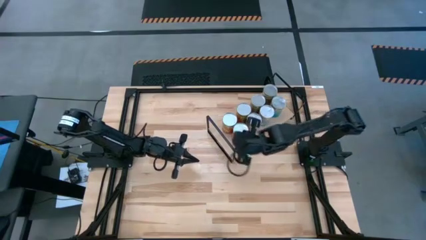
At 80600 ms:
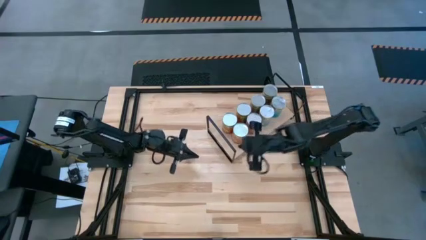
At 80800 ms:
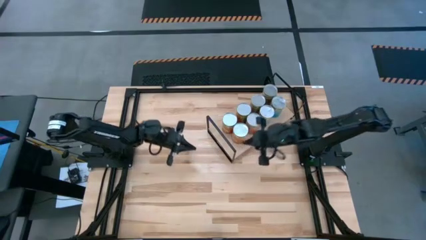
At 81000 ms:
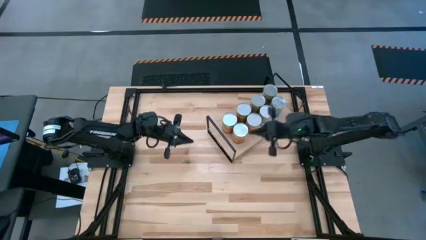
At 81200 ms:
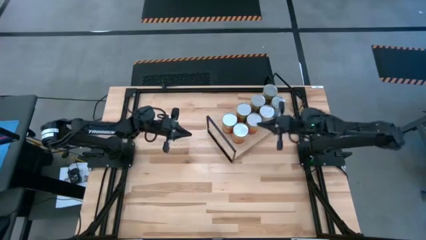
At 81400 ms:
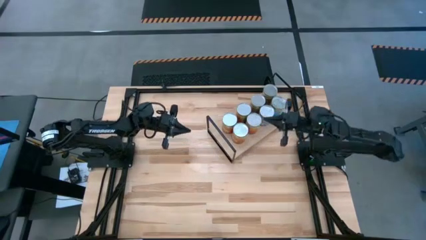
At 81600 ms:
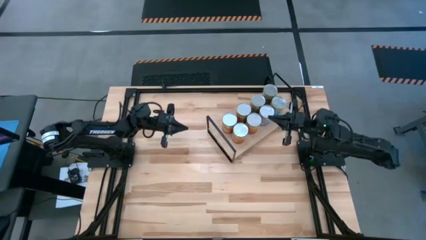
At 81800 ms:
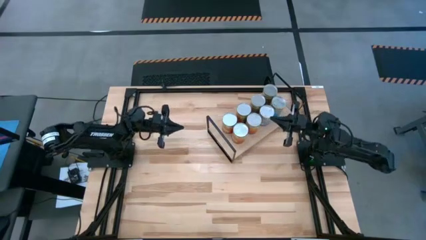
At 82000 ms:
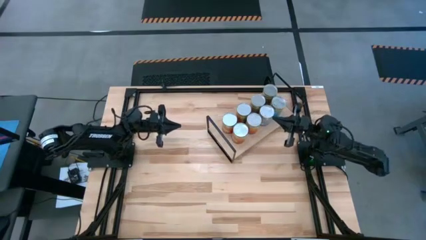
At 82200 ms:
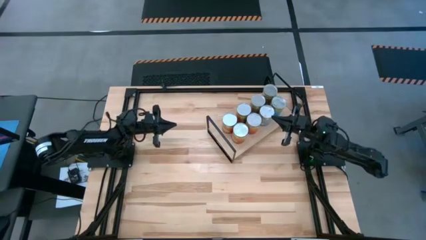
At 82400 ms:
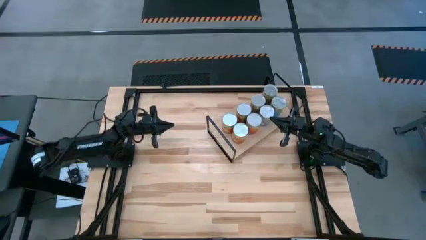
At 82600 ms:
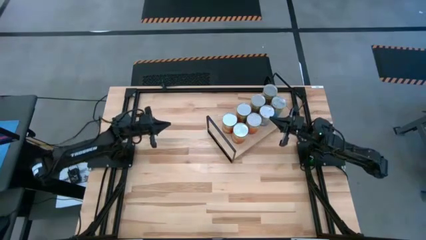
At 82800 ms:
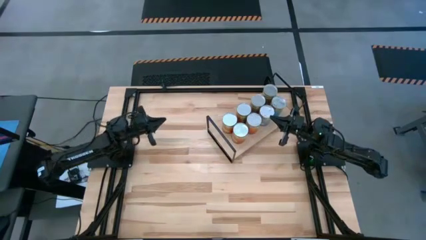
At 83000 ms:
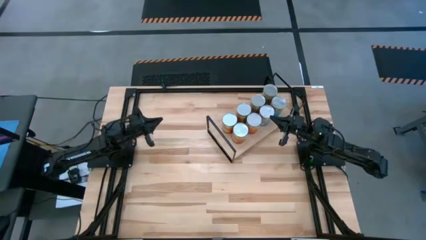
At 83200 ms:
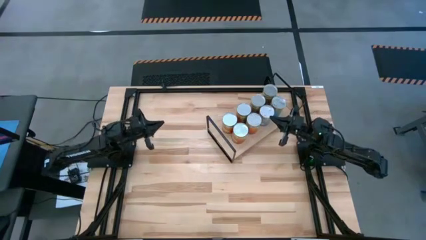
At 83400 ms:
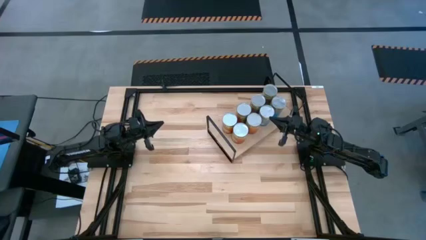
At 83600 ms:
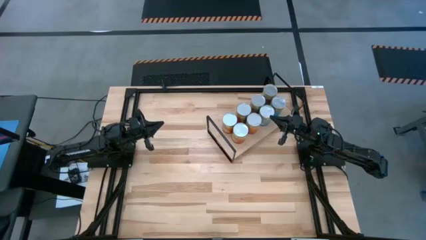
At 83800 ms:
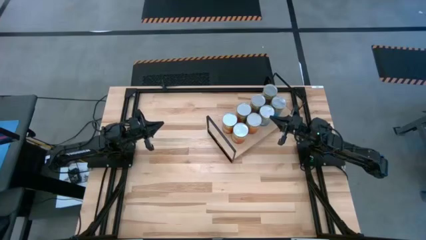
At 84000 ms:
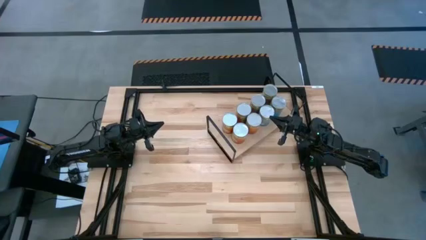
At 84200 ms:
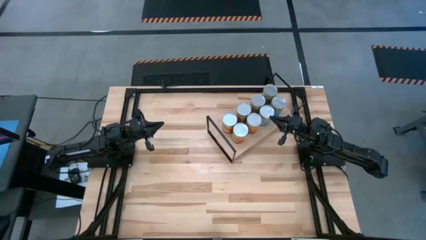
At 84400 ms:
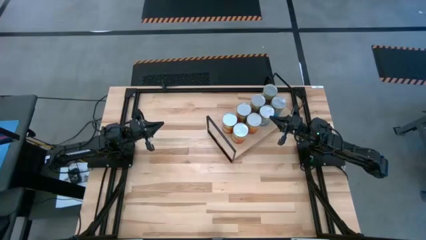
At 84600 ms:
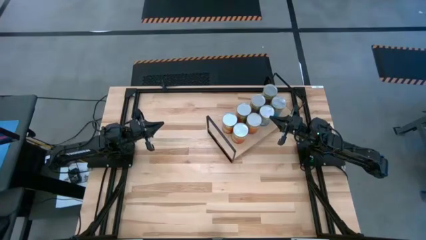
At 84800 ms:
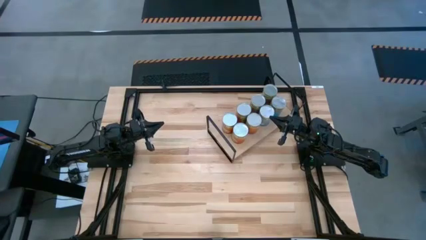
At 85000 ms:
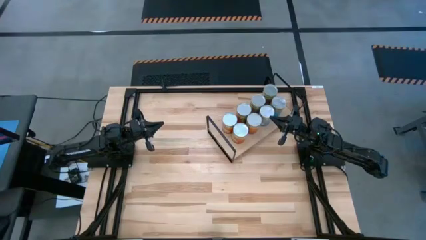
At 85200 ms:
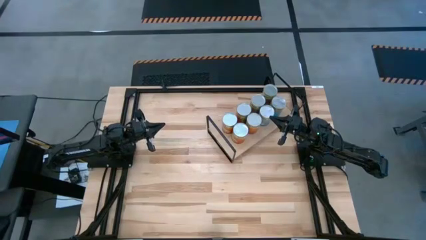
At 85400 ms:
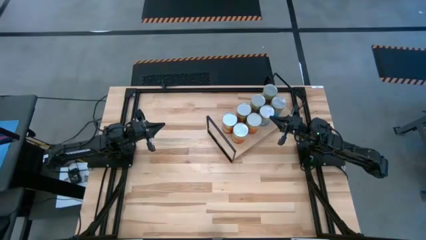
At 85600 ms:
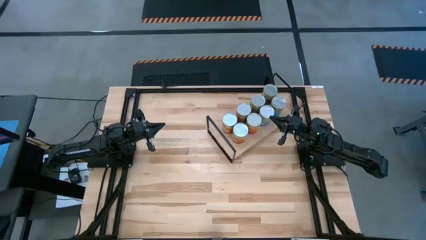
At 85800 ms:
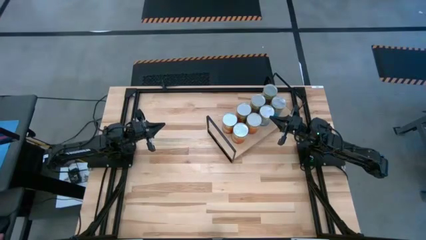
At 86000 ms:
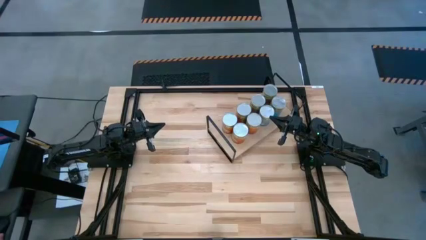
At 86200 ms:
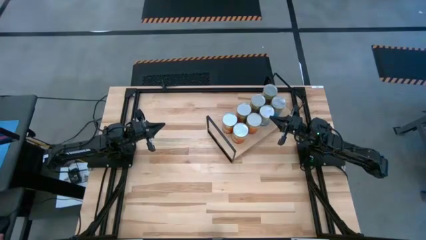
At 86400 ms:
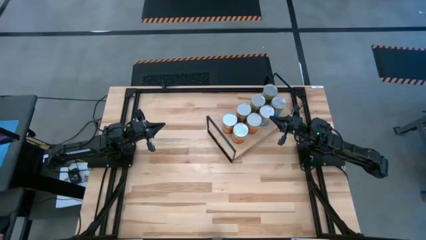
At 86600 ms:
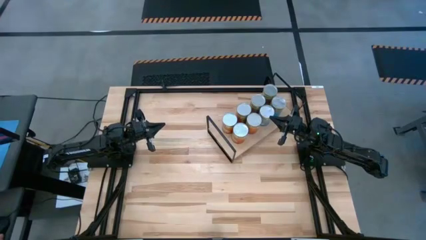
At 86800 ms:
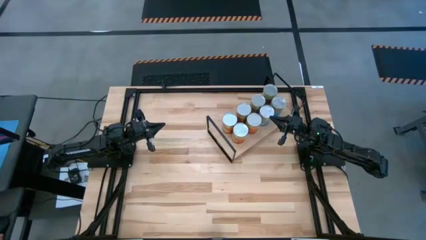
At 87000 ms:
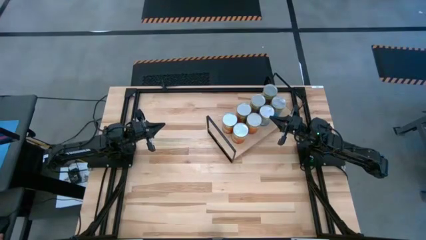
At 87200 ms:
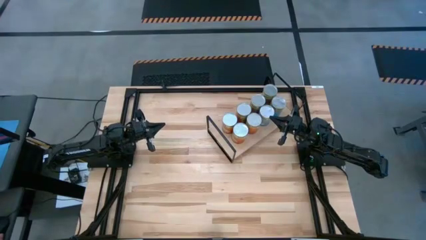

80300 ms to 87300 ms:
Task: Pick and place cans onto a shelf
Return to Home Position

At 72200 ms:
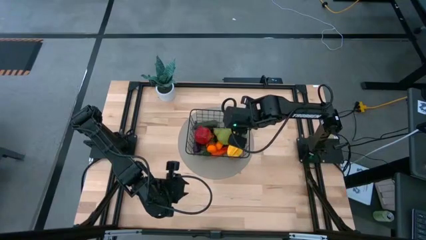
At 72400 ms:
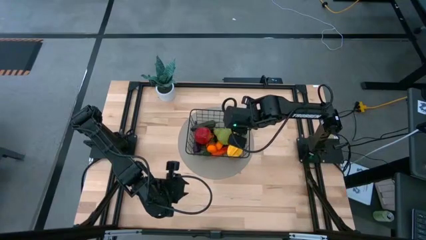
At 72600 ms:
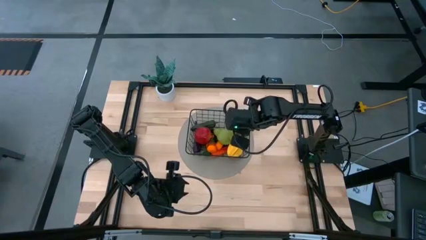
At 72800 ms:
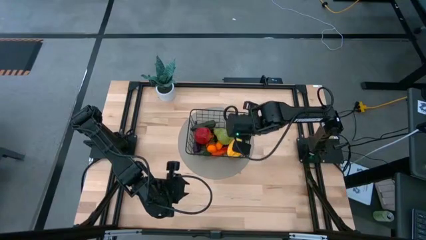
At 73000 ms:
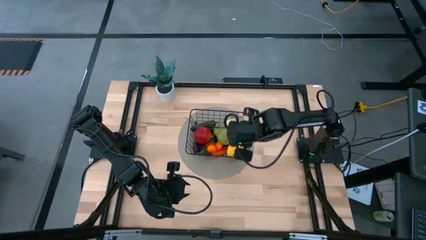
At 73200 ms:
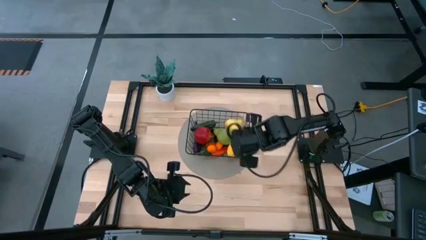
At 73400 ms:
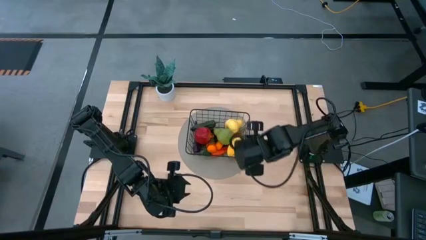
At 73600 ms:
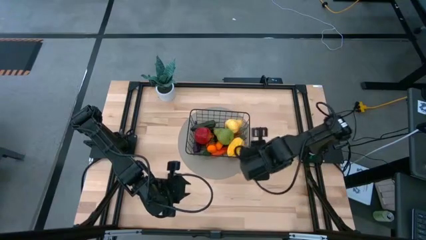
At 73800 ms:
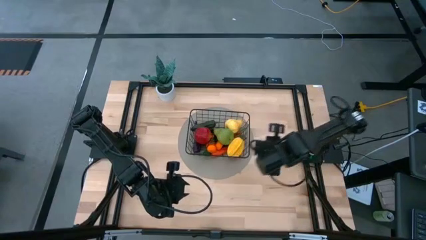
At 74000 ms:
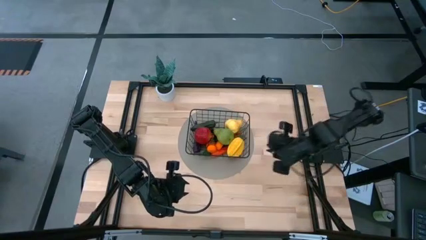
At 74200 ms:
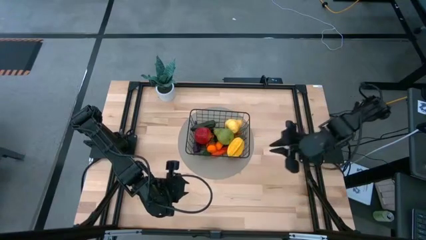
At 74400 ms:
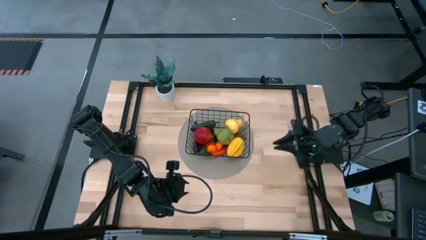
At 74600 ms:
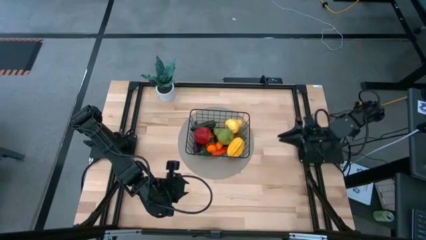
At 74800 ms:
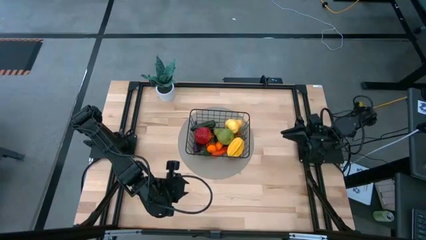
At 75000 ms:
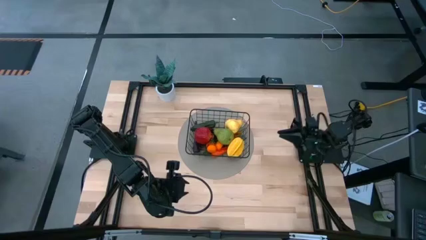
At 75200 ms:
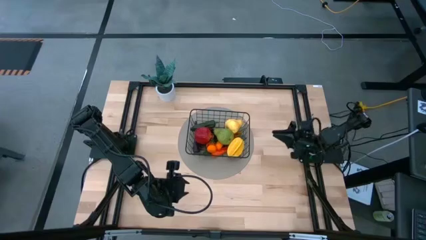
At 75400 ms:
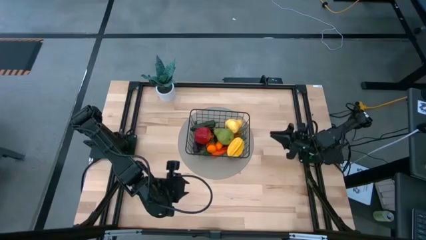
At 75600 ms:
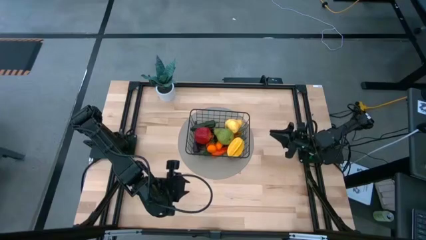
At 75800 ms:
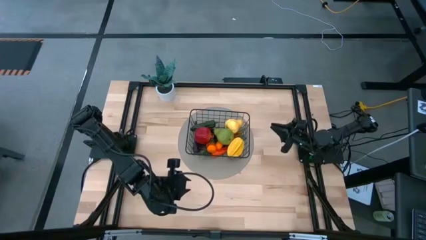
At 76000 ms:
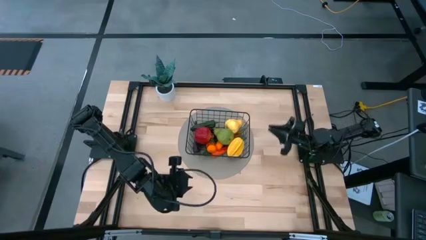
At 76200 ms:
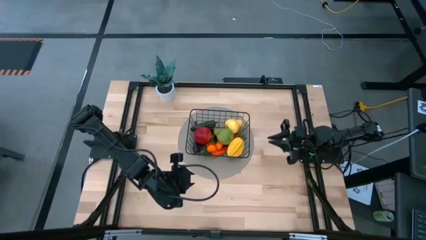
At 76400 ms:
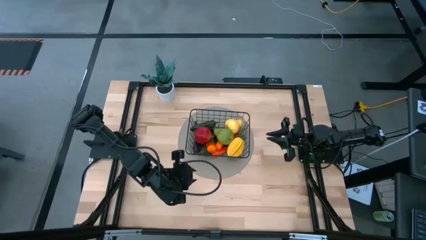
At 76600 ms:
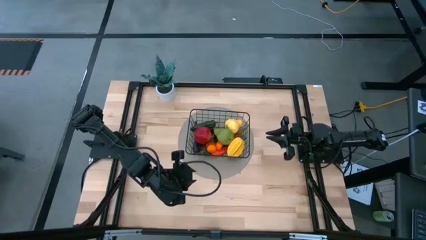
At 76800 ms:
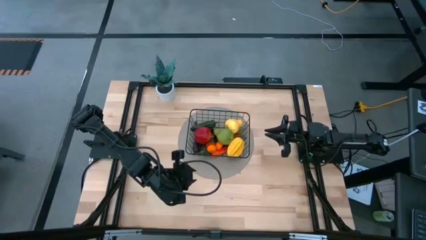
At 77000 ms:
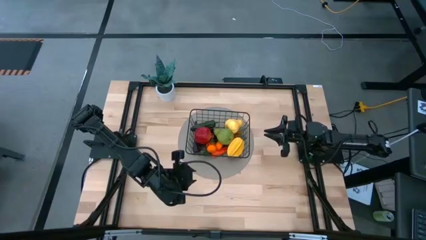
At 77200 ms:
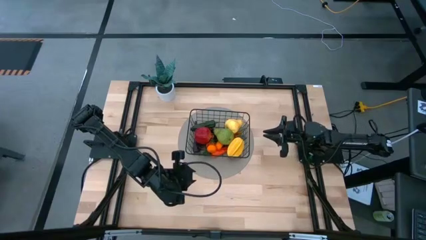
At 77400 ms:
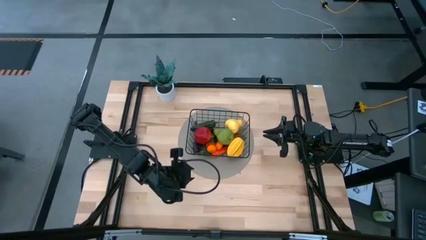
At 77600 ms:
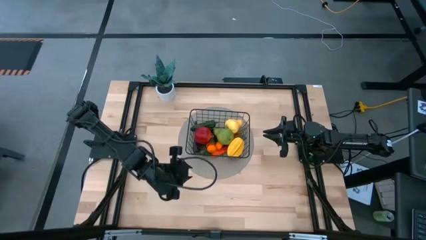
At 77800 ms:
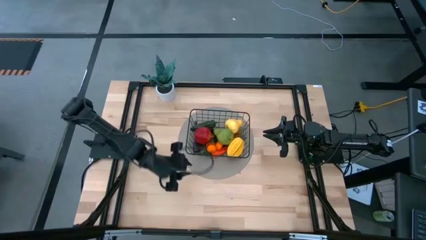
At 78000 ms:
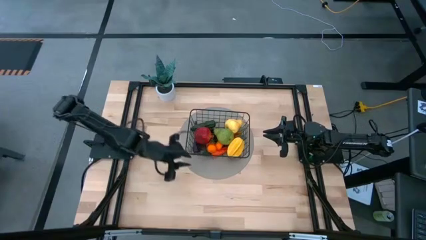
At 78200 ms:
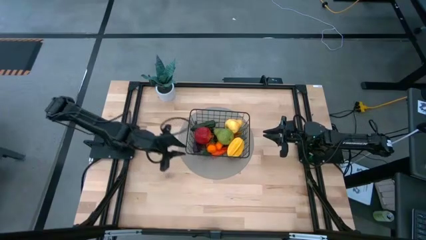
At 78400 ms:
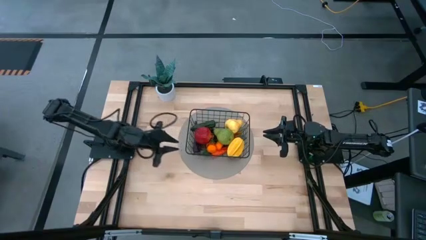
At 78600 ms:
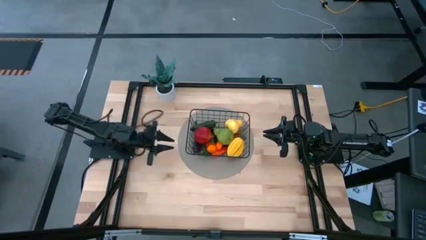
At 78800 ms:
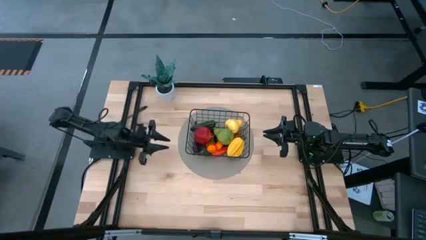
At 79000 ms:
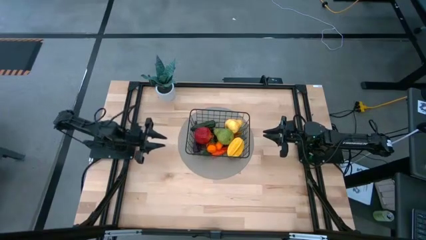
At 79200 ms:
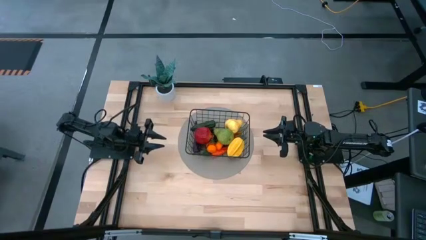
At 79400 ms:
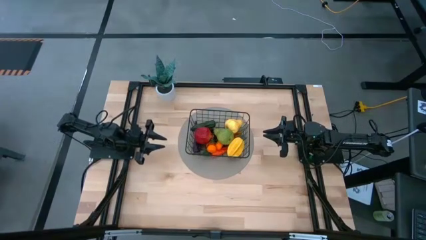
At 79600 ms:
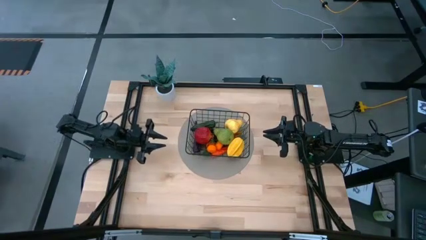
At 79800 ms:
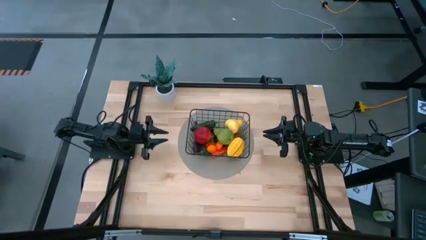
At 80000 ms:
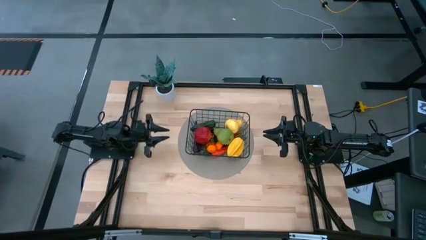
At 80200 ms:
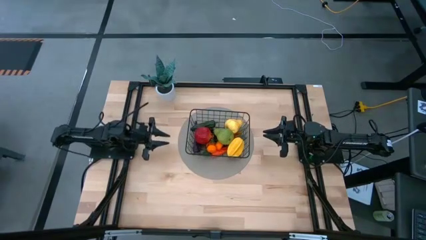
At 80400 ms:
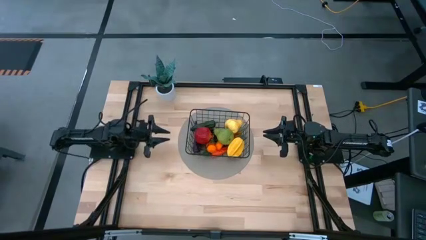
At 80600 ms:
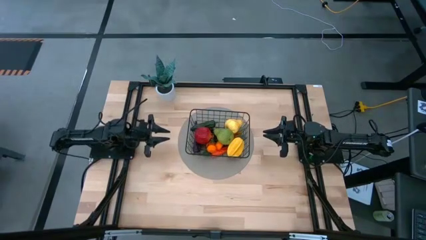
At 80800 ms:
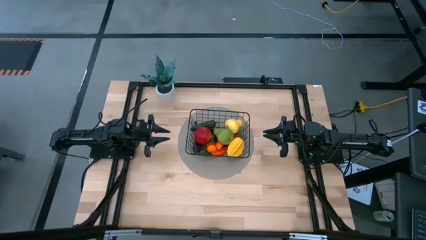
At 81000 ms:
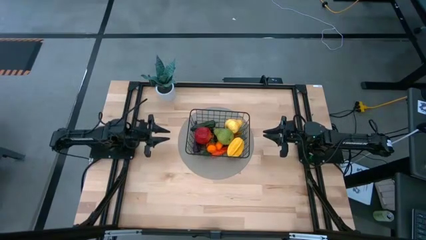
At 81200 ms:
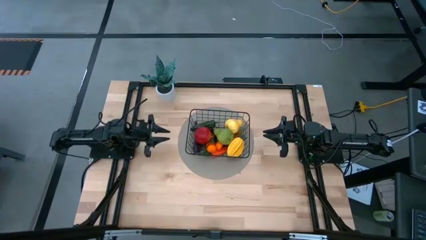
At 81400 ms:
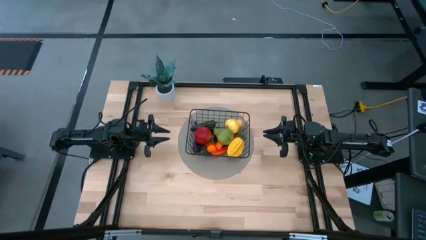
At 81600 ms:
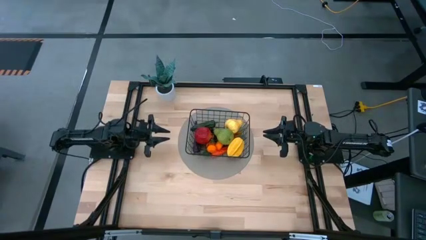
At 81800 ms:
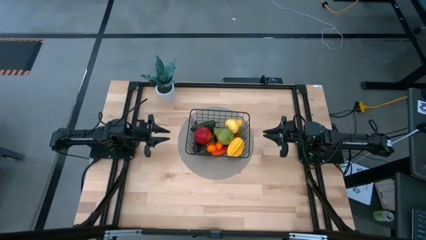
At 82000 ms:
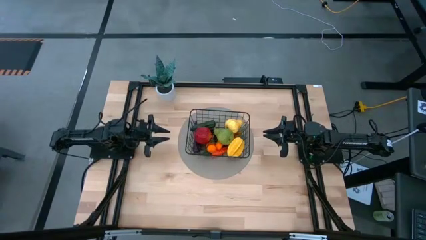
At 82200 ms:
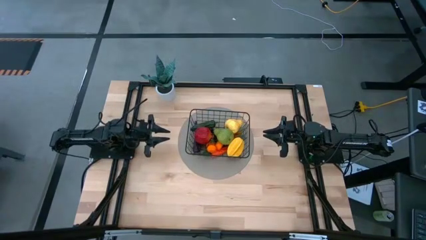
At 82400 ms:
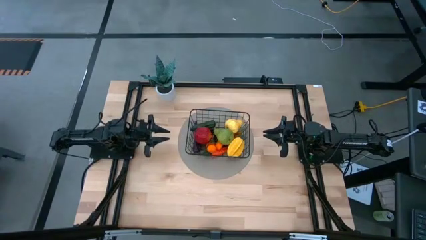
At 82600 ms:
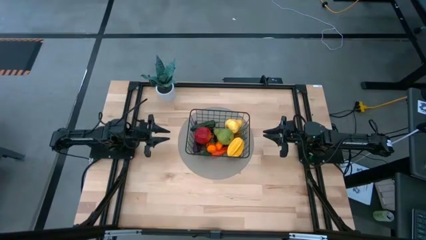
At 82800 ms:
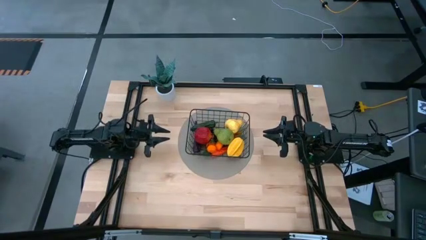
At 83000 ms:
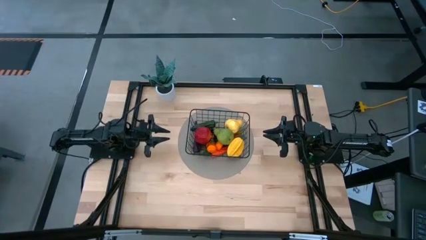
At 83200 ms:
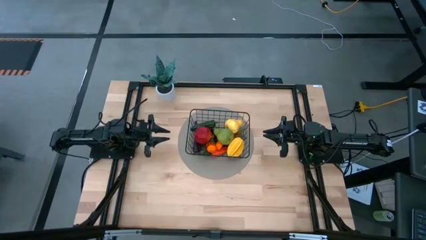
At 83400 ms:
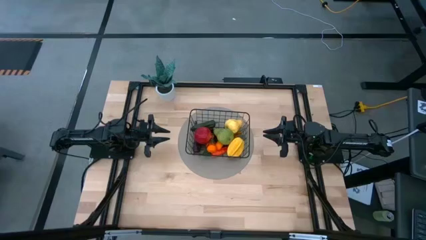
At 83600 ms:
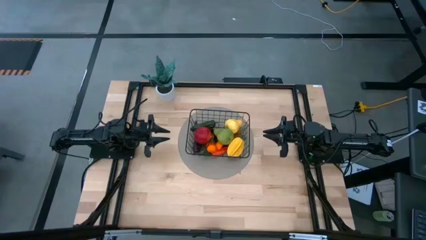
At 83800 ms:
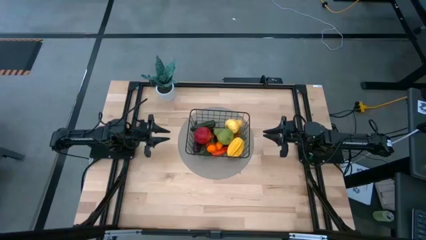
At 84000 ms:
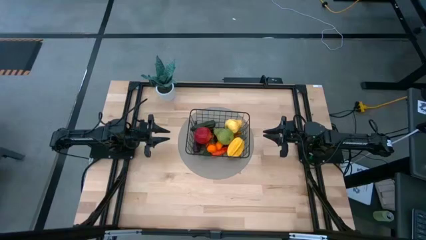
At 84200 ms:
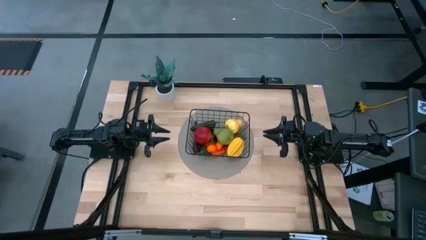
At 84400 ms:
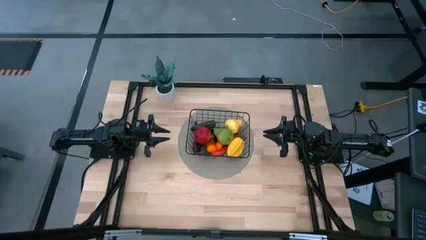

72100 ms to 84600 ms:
Task: Build produce basket
Return to Home Position
